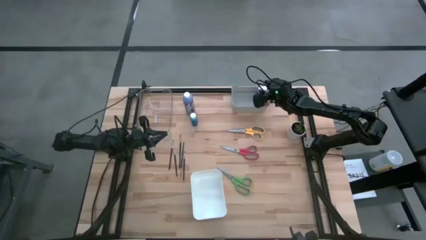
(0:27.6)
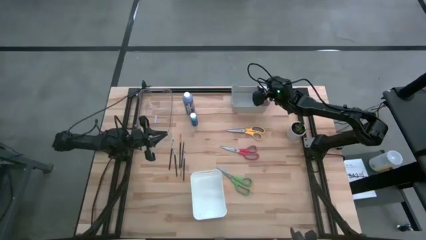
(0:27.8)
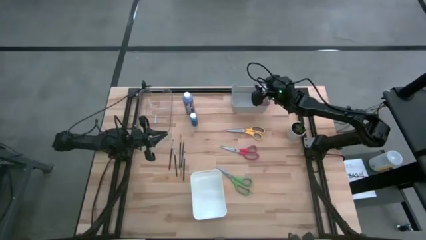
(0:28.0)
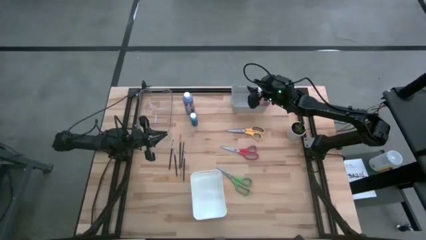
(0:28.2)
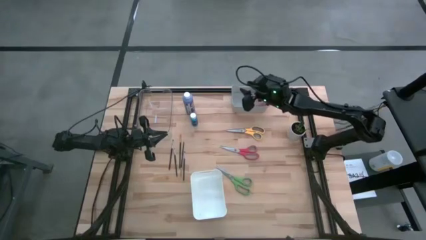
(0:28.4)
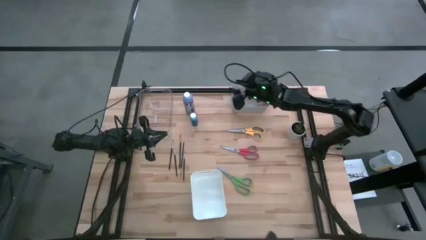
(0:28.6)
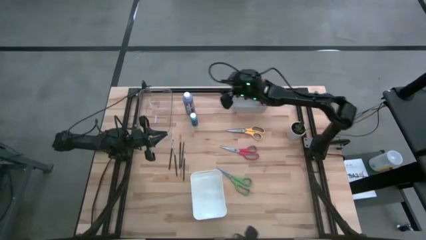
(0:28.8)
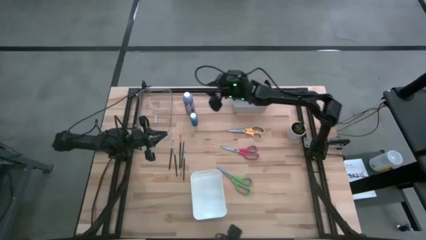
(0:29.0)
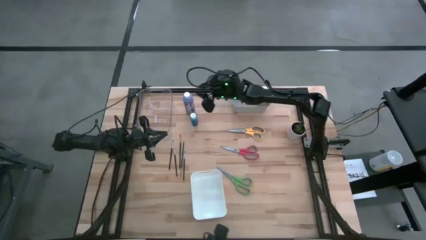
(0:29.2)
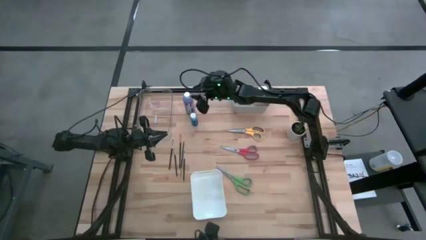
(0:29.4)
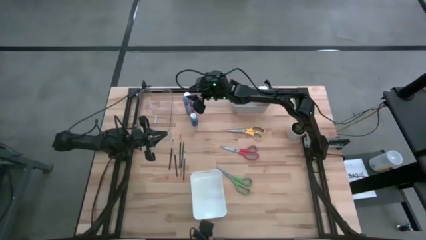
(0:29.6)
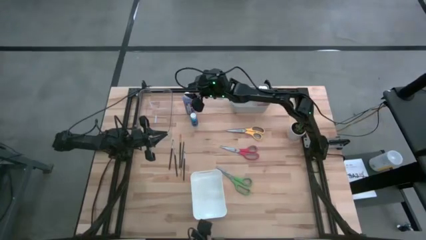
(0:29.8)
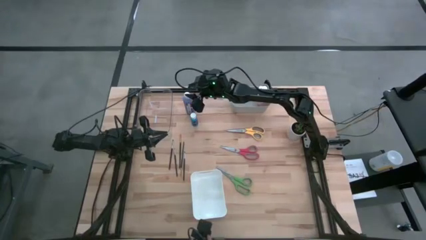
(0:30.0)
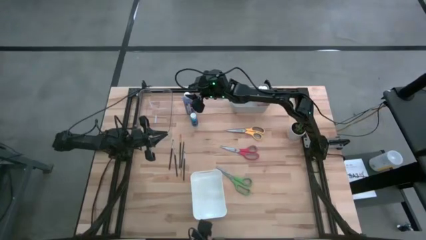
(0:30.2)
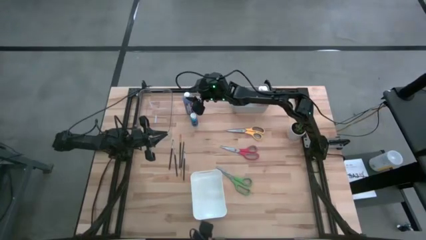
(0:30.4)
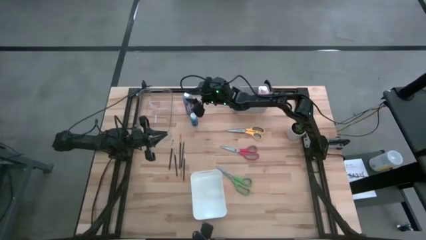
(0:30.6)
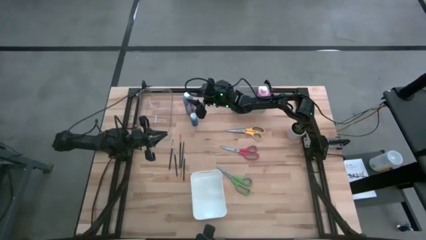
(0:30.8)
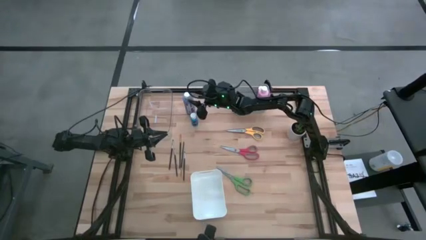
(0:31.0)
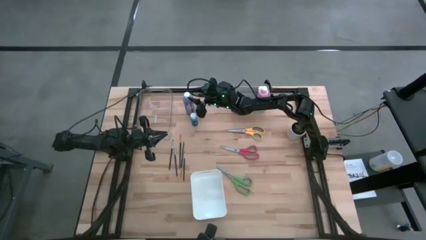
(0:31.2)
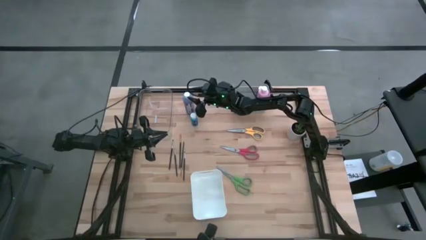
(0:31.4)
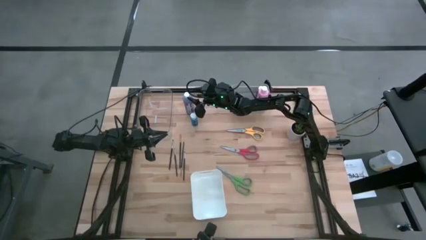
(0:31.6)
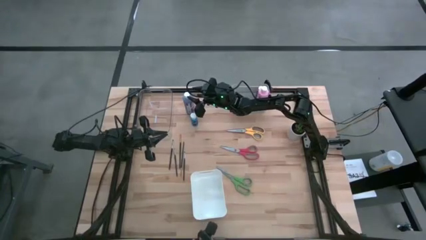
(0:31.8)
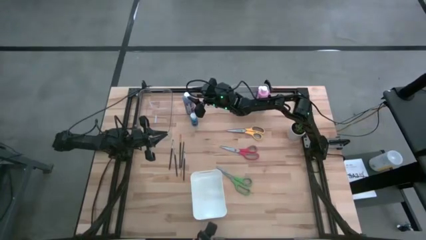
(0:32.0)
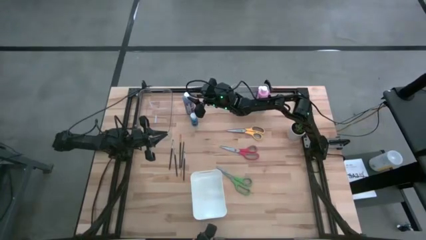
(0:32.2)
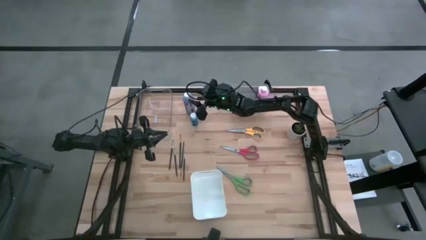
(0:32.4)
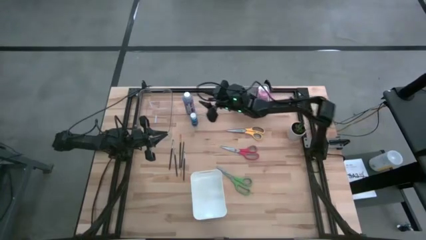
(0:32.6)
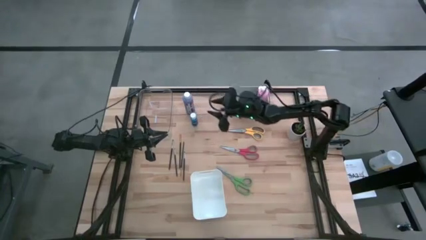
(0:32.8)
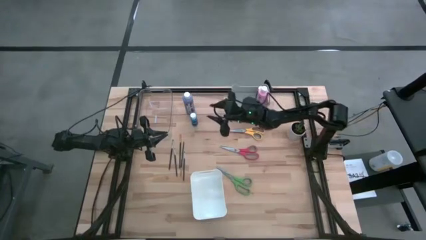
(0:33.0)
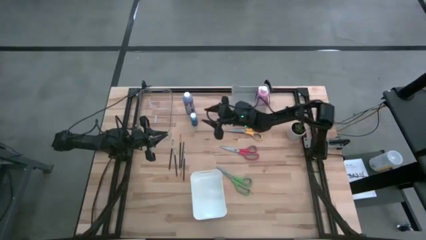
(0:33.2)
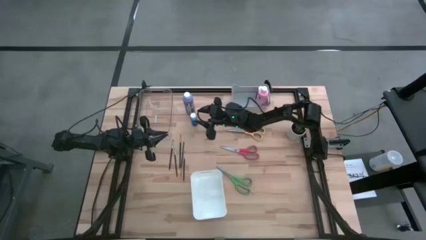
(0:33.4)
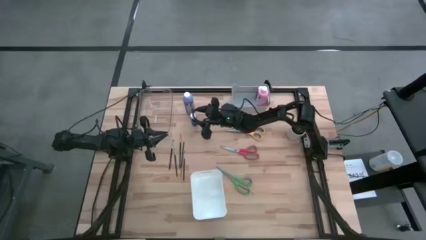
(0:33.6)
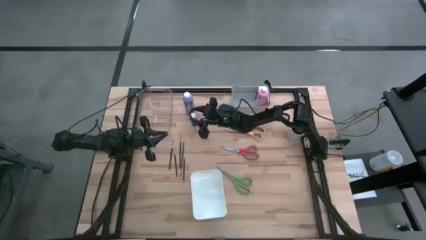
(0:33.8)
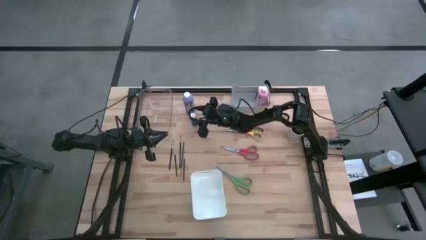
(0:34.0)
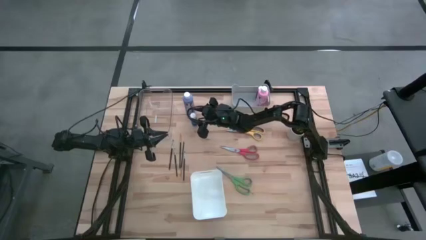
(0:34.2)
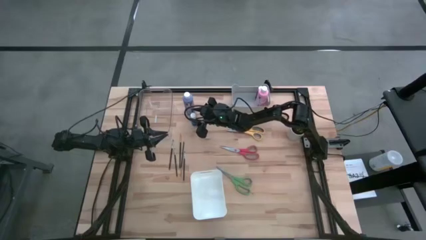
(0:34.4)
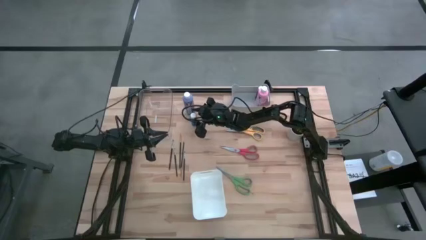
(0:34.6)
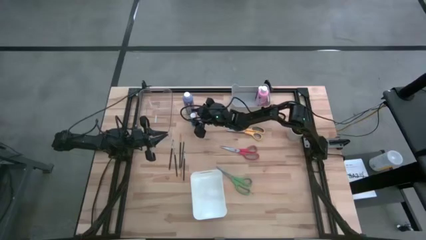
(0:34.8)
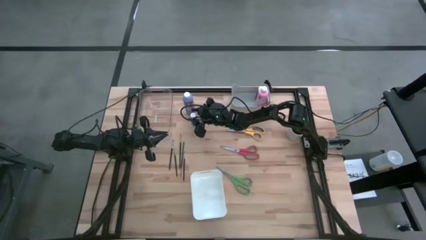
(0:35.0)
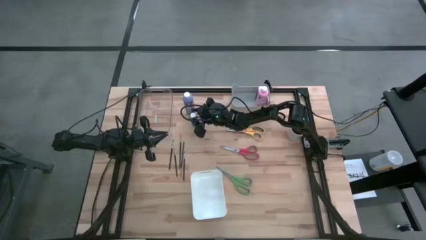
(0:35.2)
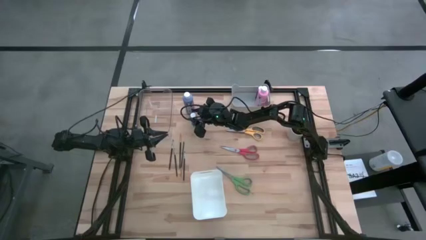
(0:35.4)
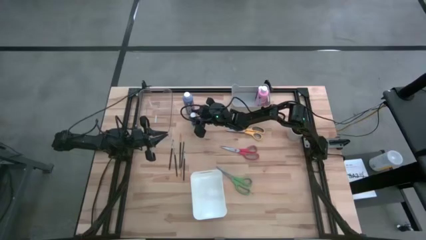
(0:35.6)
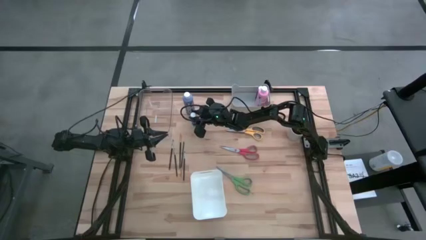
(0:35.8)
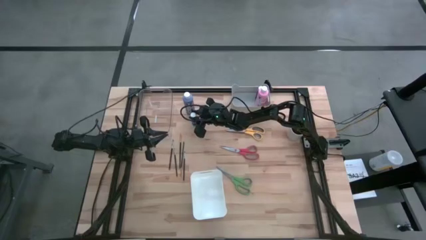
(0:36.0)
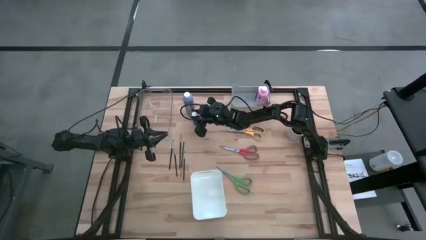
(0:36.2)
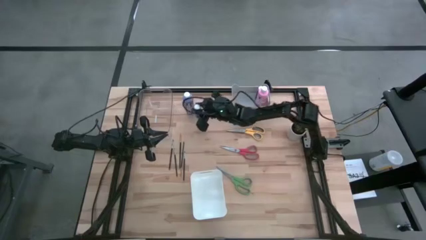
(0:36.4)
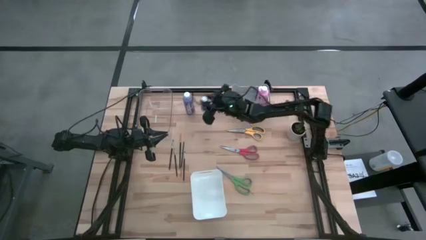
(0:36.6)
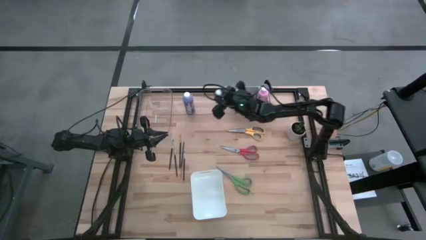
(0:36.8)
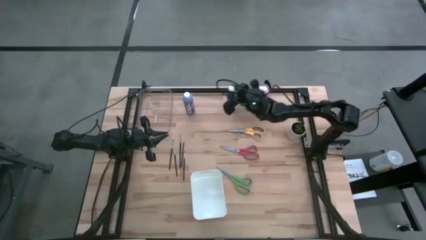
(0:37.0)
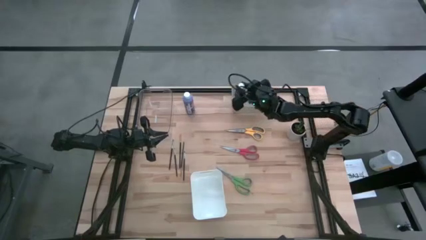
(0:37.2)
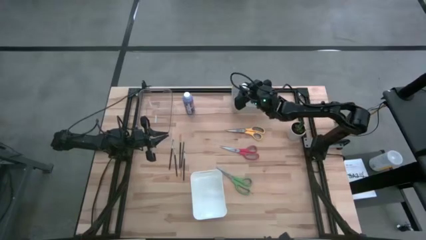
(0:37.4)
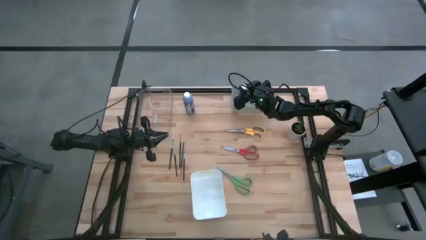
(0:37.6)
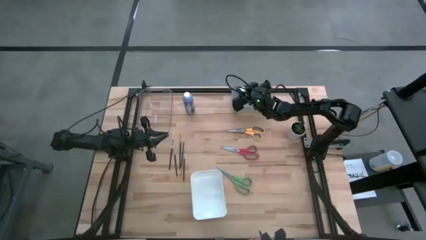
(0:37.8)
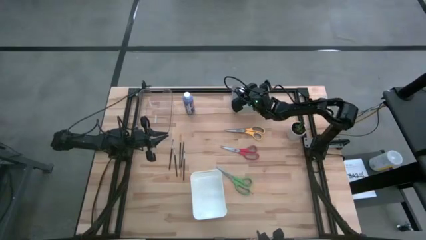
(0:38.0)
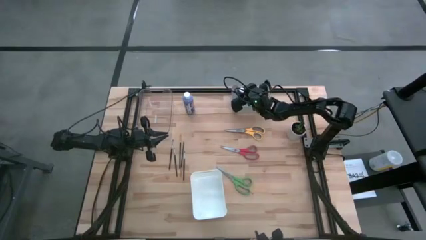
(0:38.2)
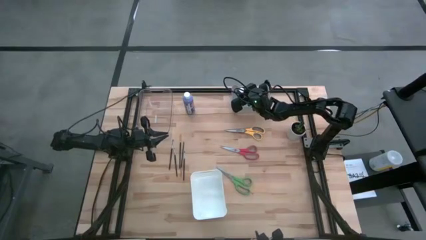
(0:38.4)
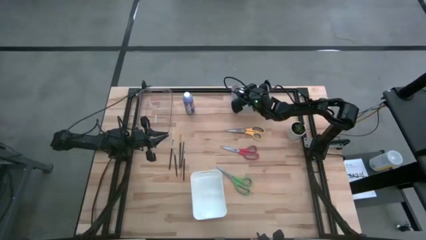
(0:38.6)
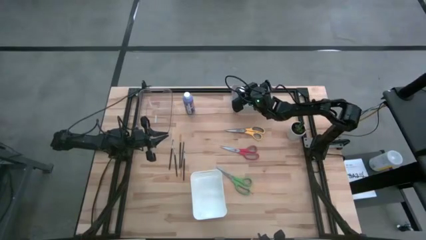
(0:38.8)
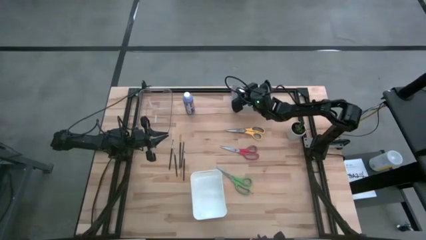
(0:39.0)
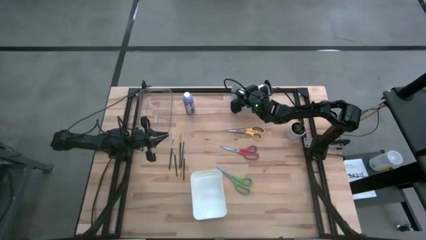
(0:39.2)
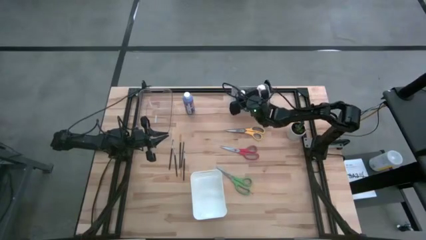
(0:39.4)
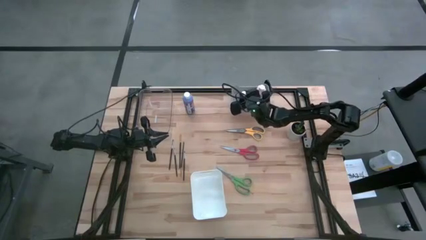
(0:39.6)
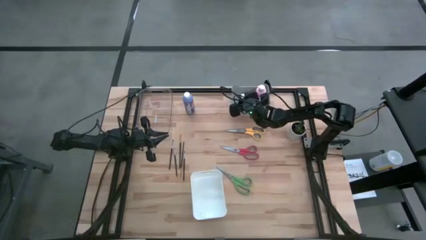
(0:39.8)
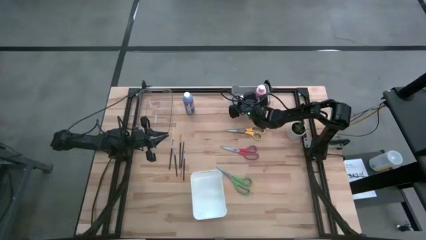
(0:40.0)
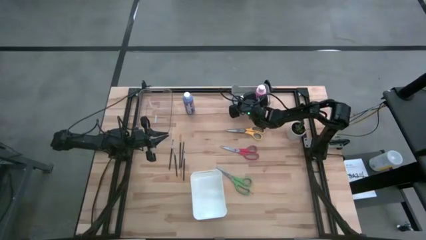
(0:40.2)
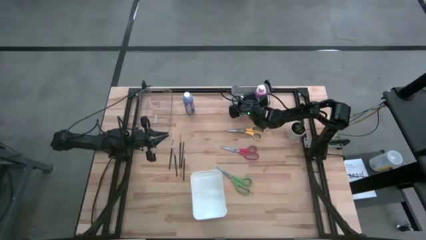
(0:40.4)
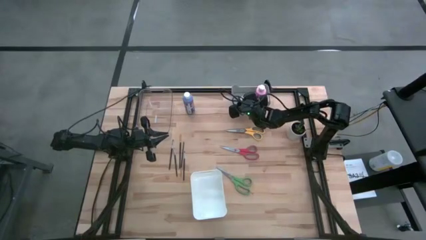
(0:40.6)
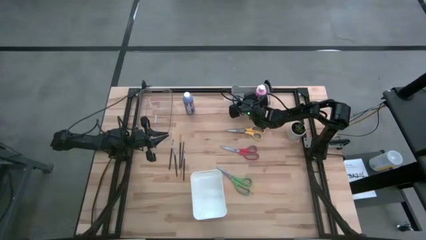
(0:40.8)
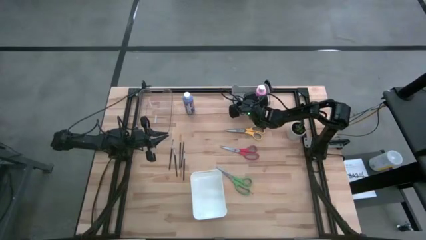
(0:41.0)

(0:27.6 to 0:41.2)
Task: Pick & Place Paint Supplies
Put the small blue paint bottle into the gray bin

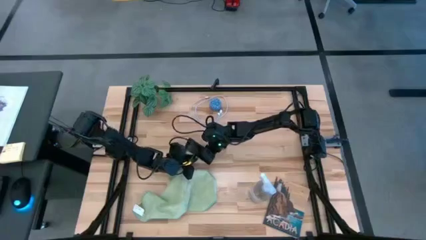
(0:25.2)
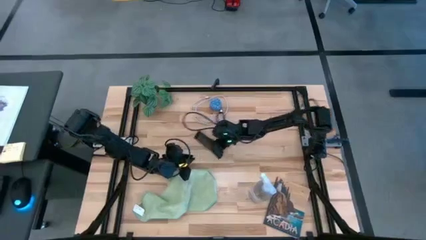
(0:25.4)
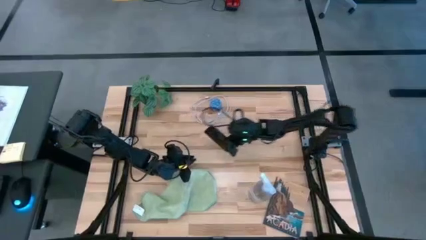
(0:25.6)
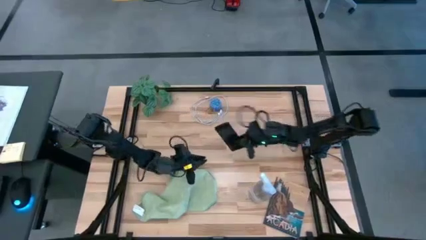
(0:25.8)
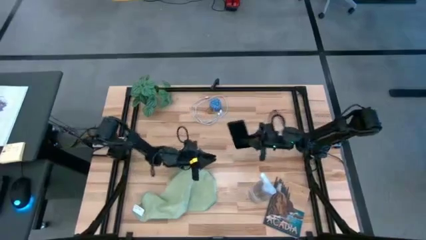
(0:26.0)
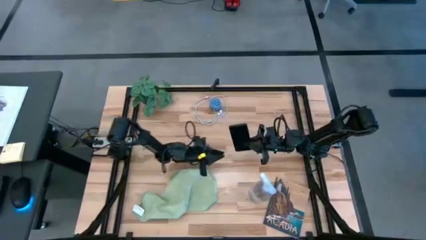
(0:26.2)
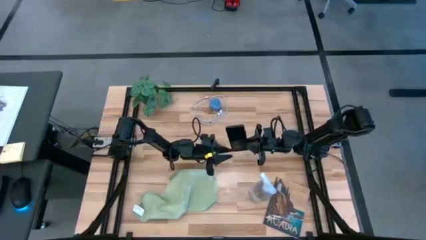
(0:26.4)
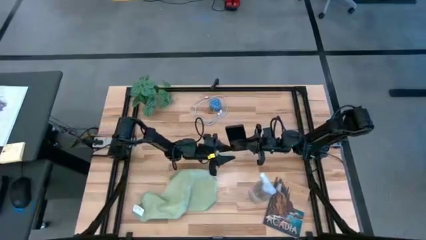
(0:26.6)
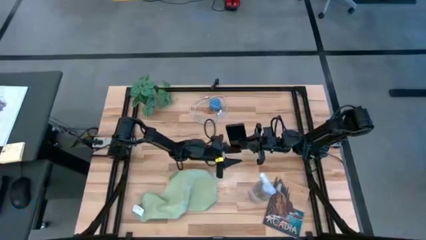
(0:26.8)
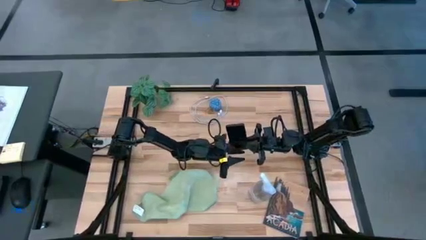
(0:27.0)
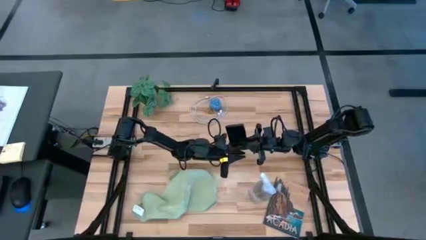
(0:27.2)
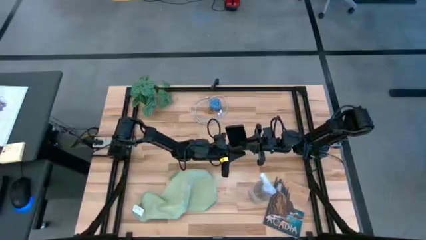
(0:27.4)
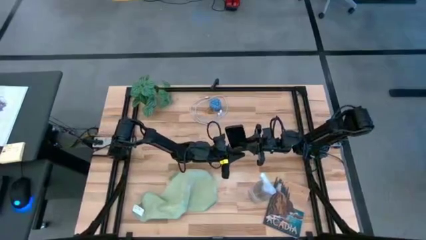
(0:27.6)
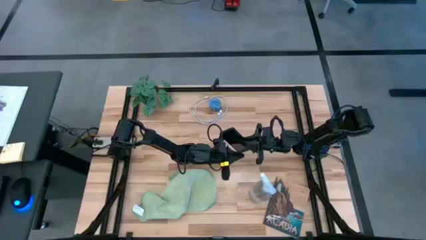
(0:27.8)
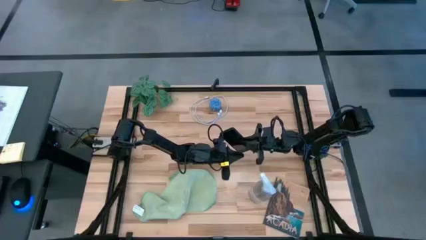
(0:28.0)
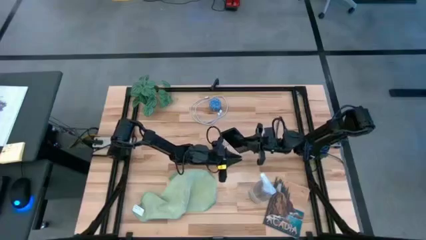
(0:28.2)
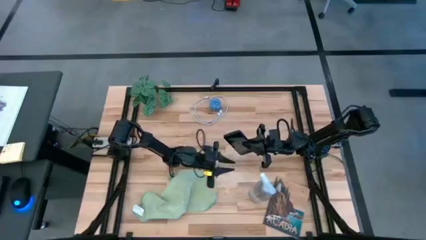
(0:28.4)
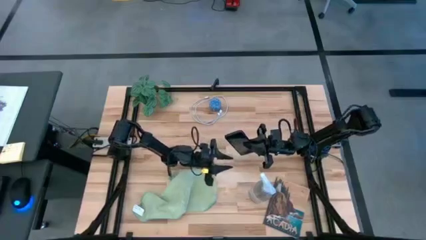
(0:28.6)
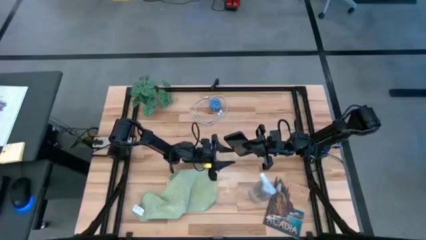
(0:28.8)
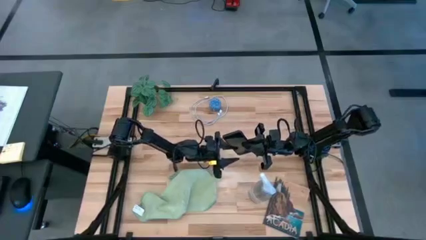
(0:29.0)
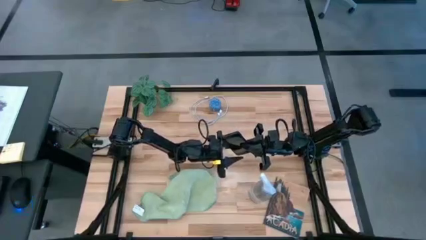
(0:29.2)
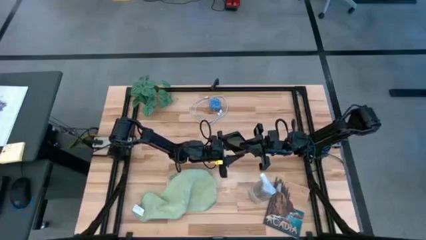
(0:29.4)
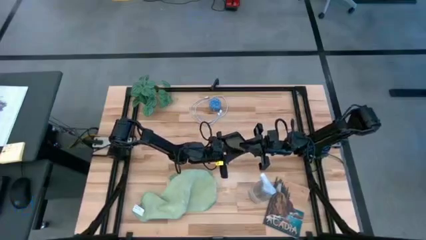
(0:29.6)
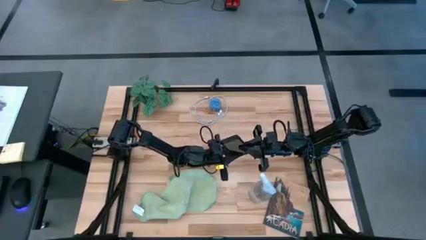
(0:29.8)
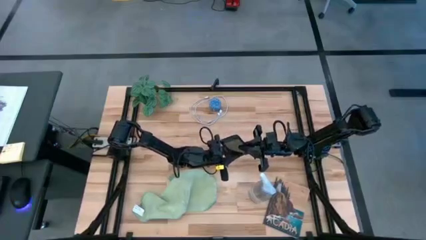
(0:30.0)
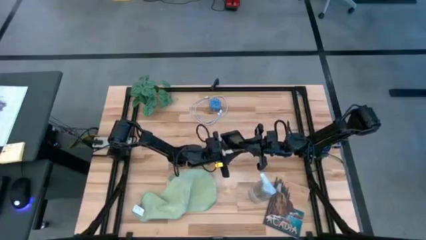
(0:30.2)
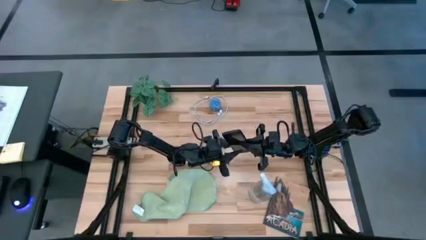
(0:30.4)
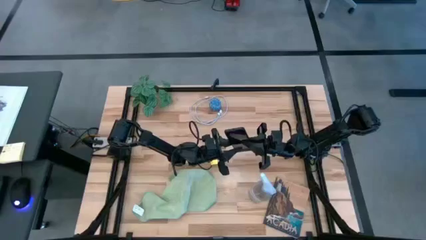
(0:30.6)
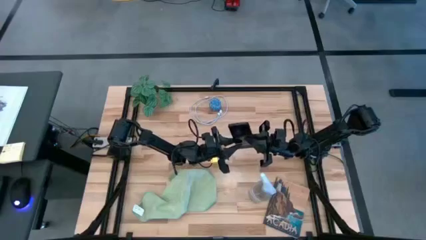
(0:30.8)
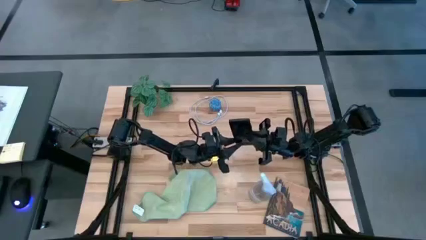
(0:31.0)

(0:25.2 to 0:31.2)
Task: Apply microfiber cloth
Spray the phone using the spray bottle
